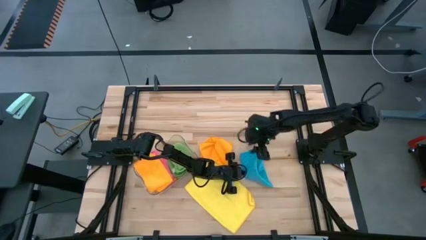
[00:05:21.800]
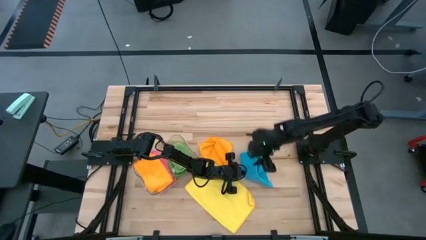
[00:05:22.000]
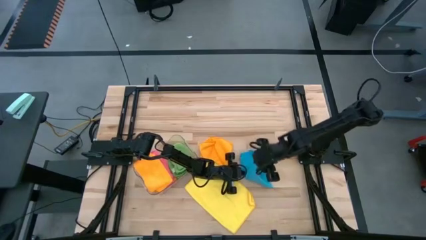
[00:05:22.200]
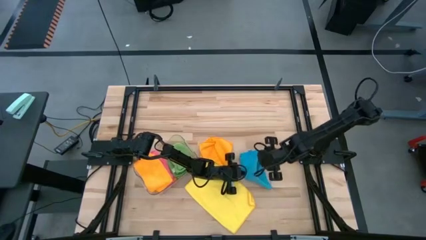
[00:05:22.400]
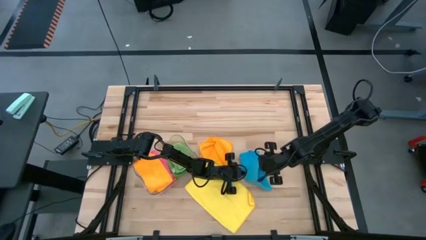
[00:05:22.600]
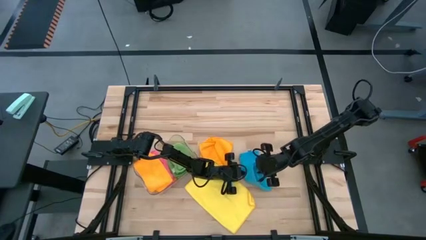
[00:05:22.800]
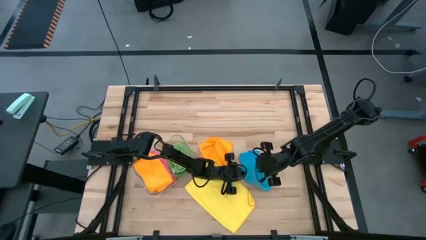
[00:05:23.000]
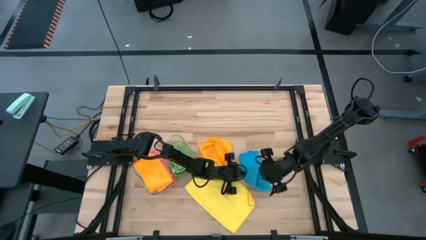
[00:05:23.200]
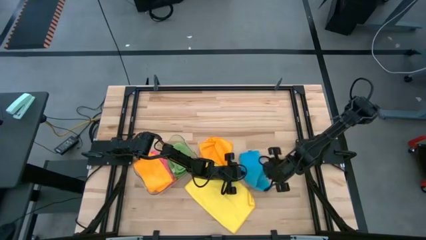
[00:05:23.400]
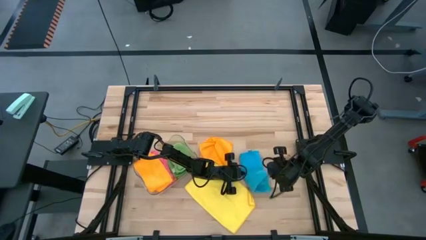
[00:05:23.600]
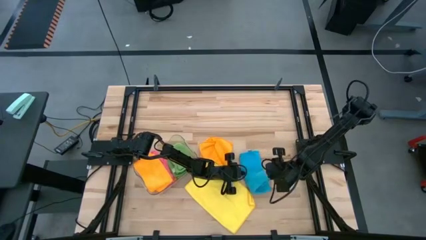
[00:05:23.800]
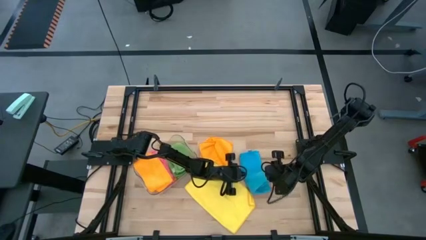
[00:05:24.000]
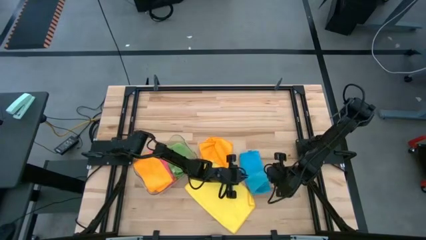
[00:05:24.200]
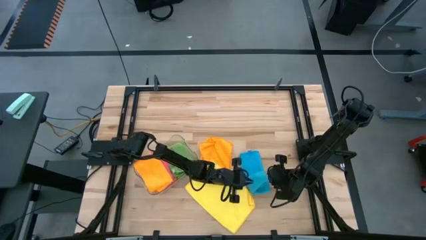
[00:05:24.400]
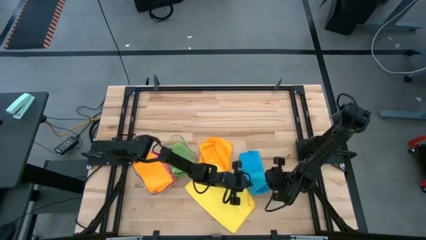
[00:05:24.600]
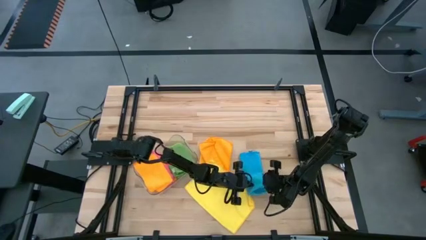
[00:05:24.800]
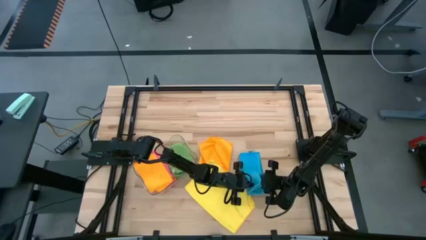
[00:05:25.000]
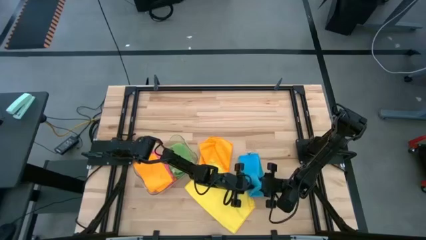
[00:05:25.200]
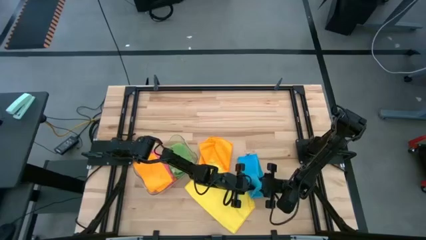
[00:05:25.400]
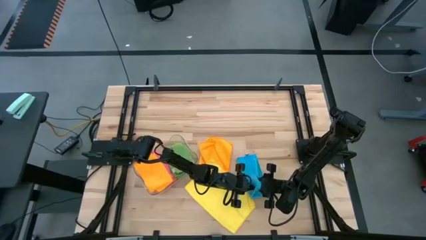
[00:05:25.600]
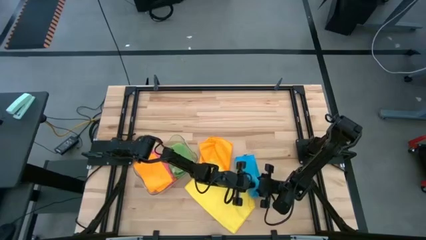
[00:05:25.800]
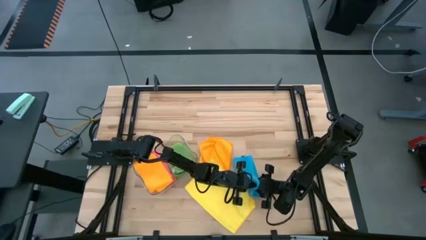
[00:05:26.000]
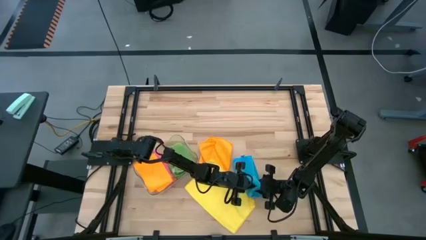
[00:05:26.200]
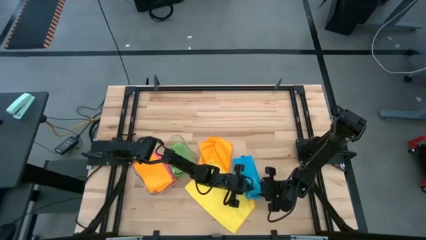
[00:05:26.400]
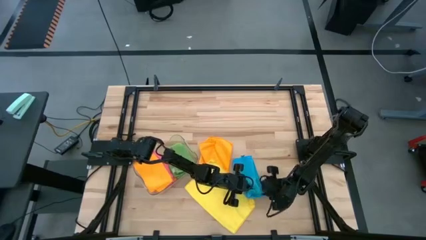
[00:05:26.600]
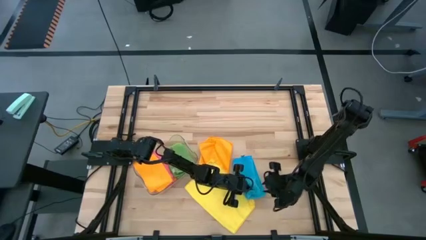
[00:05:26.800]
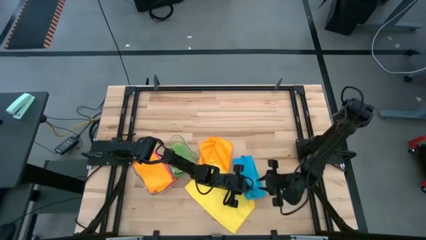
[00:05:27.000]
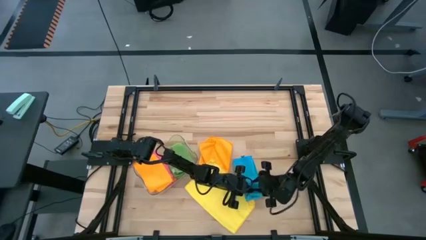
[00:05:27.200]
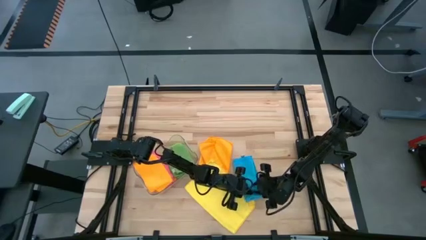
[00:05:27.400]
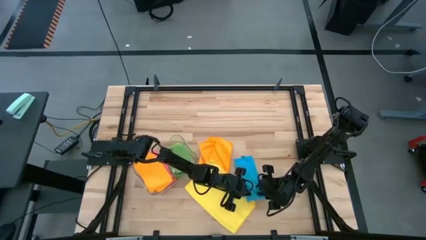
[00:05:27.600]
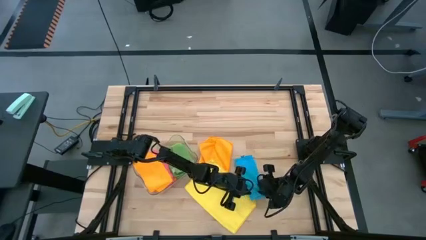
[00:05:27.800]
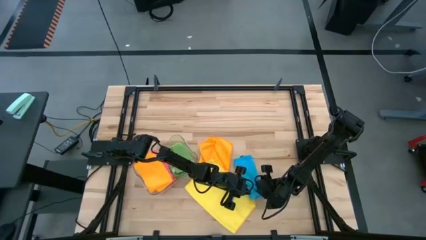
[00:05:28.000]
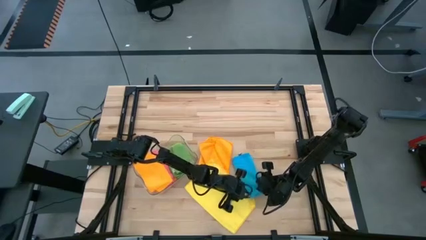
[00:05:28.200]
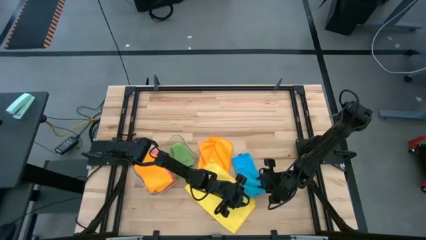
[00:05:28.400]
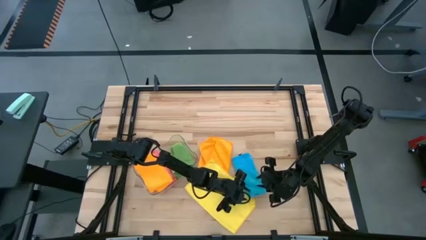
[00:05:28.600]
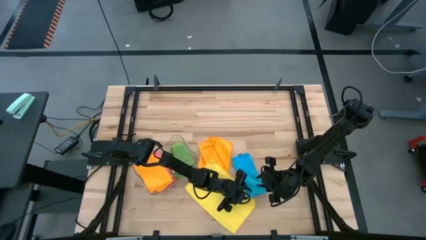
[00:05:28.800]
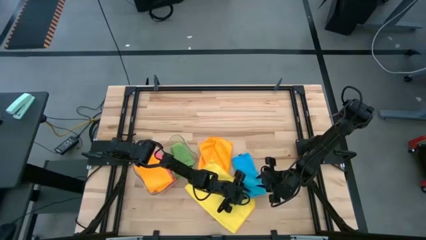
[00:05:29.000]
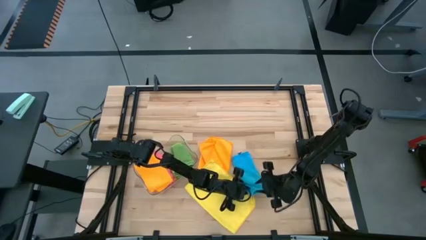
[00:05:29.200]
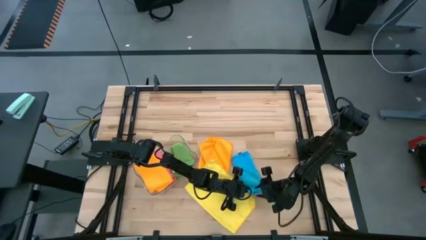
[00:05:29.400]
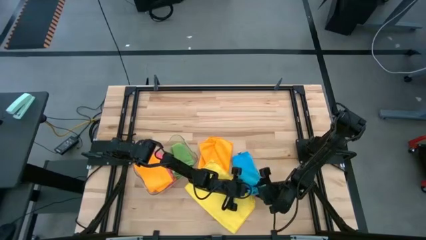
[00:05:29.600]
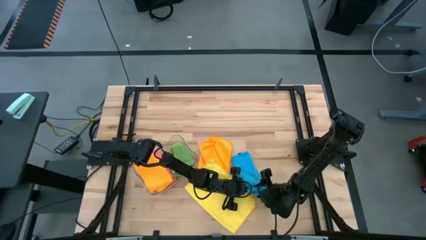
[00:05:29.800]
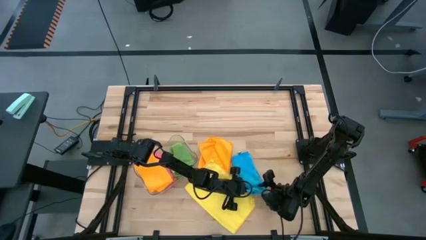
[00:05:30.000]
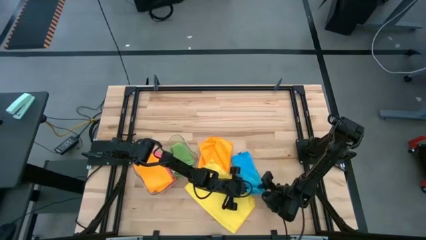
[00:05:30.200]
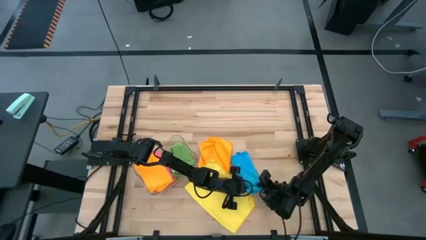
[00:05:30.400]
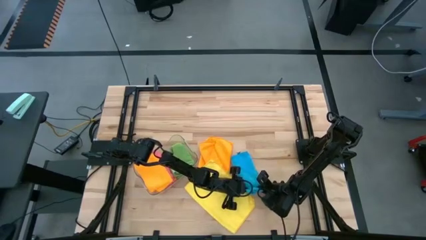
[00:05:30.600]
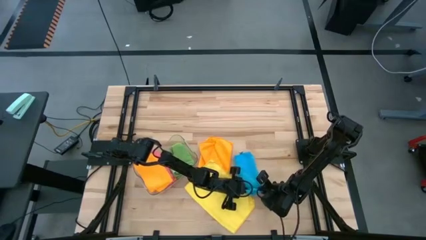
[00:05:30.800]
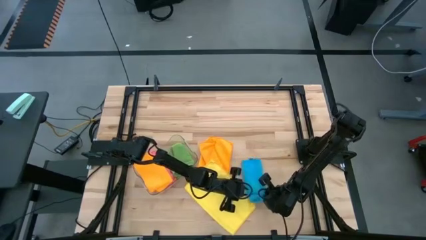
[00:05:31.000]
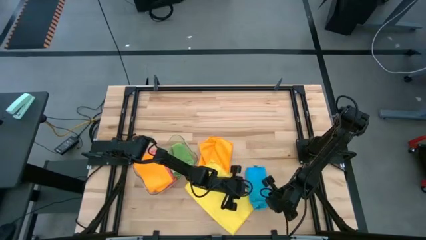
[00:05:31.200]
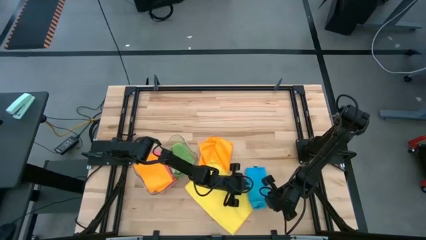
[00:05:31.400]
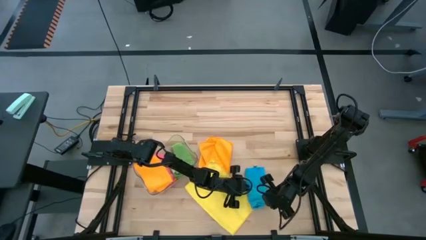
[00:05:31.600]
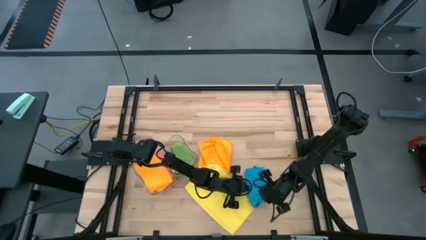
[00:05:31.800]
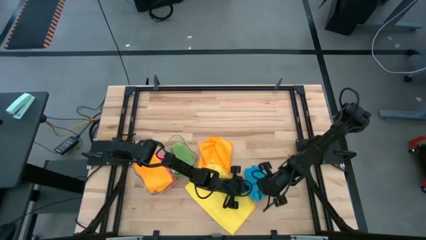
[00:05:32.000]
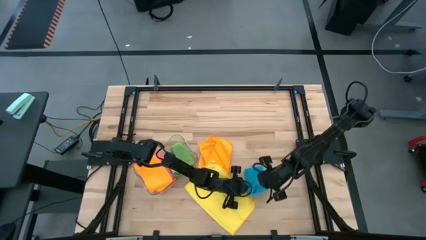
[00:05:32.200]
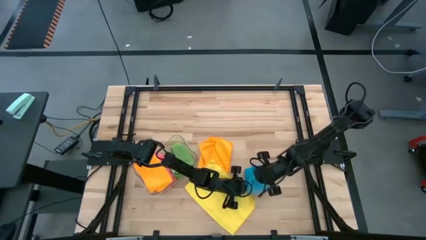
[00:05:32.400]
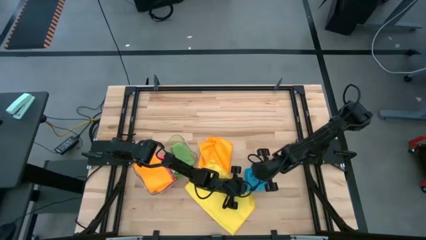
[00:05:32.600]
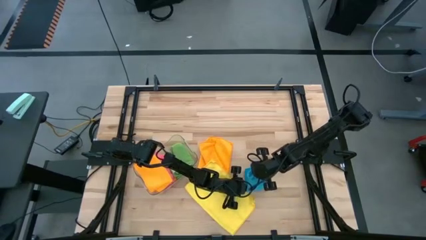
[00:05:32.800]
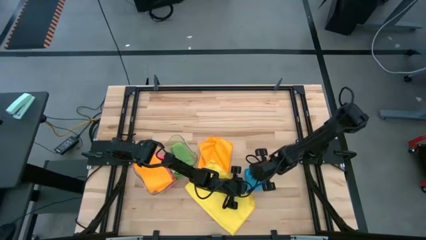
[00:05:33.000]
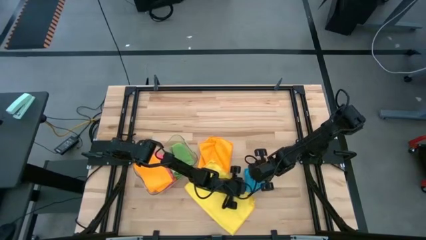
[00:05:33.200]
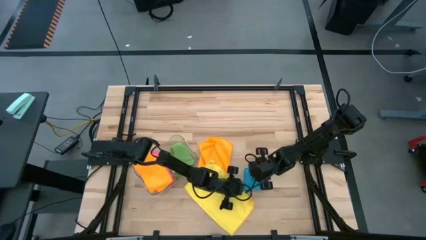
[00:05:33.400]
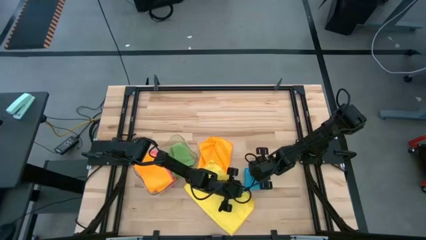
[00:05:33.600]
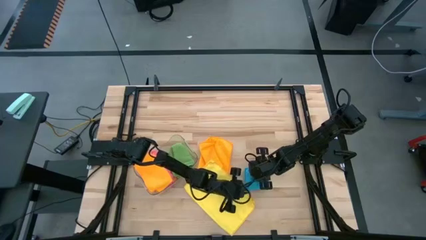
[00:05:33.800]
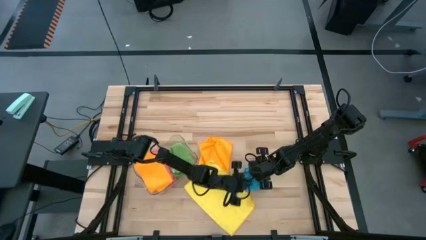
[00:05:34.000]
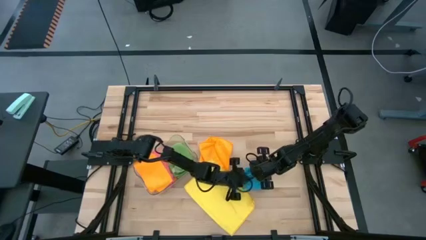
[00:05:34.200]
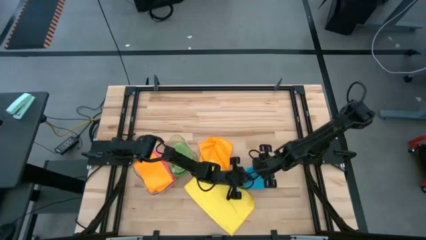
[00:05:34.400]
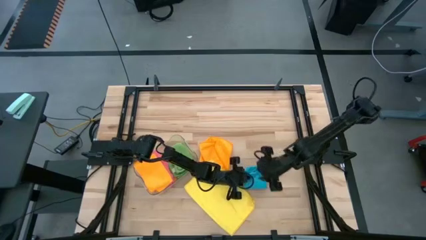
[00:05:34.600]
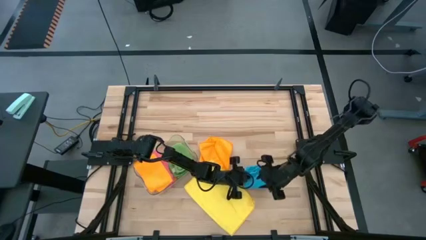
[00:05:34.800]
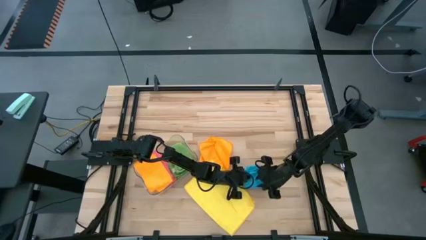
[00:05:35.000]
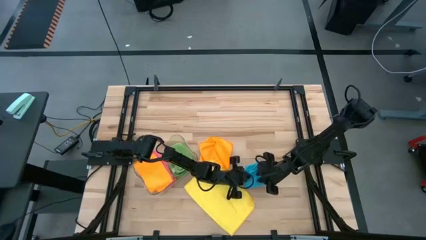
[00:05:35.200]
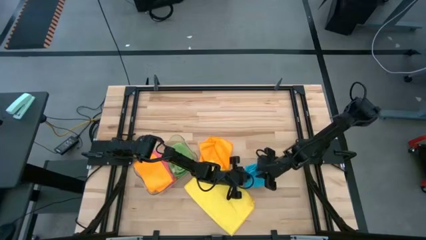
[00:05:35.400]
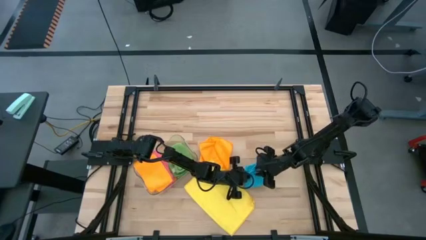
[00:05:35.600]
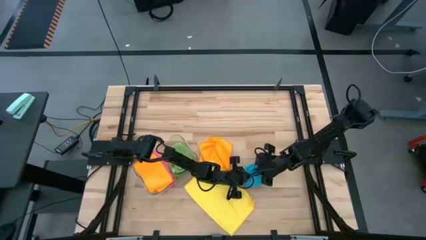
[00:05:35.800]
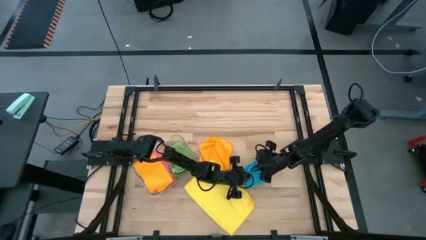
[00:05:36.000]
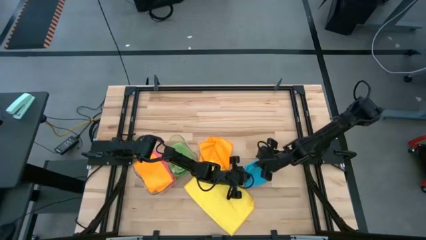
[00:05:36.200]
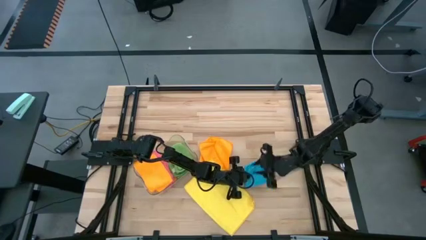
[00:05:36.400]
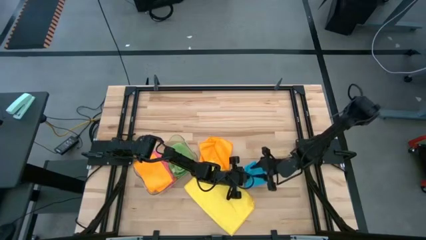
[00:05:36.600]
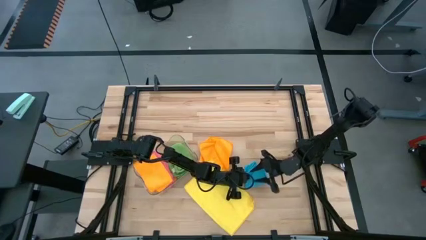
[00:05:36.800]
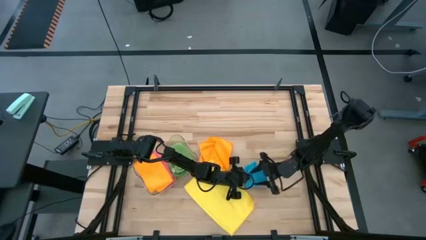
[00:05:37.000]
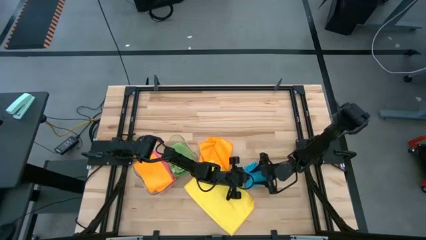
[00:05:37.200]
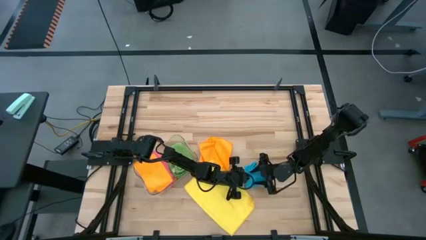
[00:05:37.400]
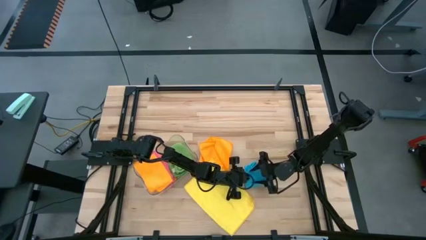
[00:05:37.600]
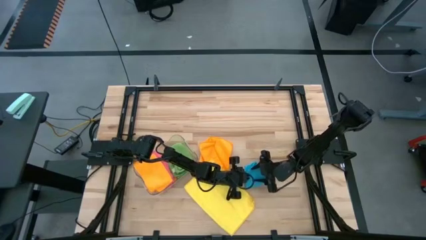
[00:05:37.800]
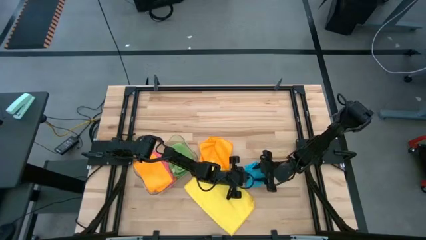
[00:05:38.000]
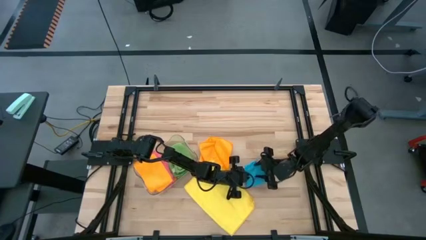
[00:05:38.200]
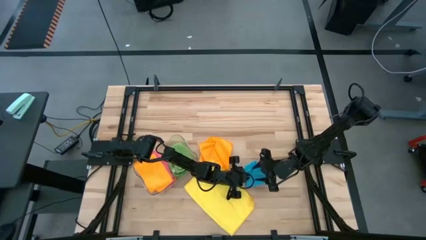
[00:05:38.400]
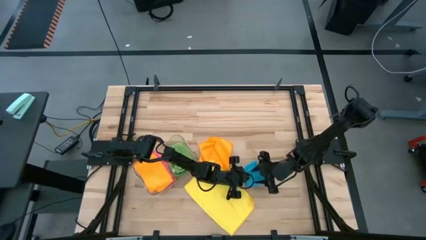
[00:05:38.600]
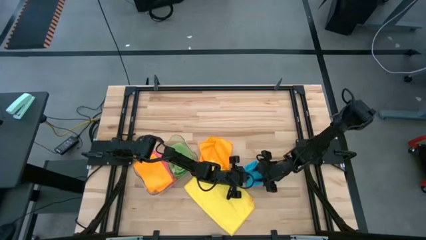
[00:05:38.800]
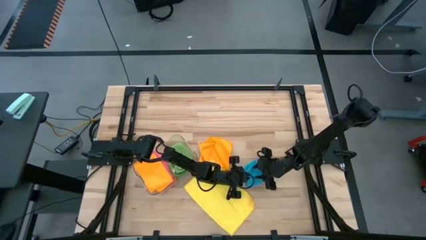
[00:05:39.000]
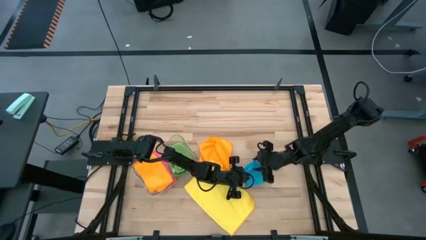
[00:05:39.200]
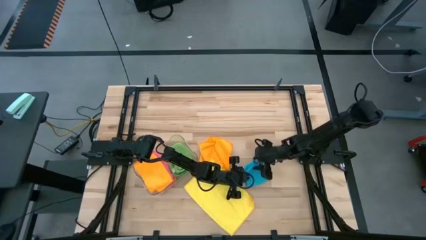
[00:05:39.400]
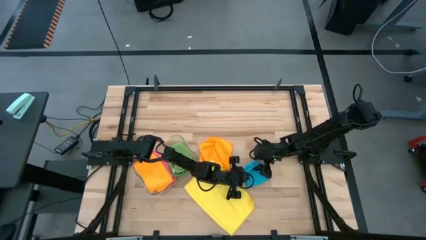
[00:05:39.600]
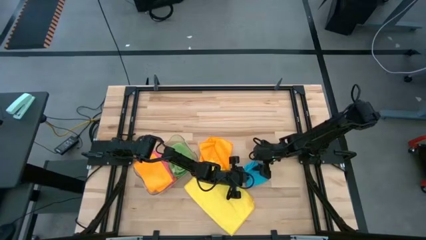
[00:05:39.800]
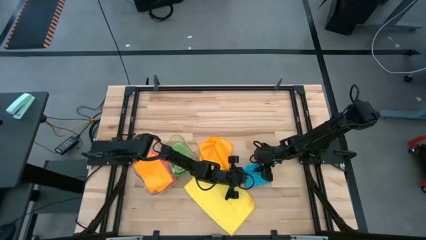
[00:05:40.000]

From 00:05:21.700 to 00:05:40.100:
Task: Fold microfiber towels
Fold the blue microfiber cloth
